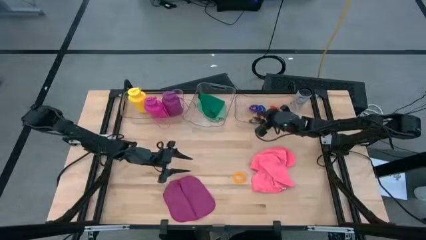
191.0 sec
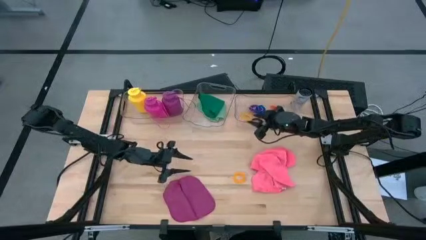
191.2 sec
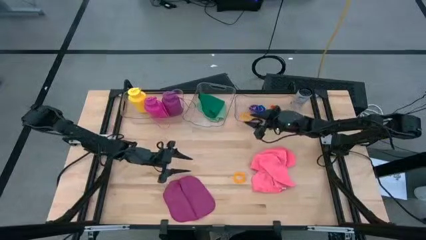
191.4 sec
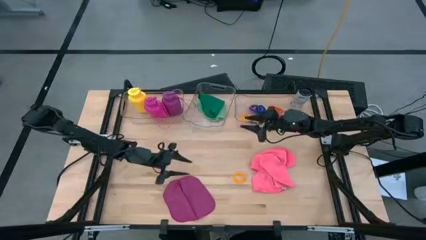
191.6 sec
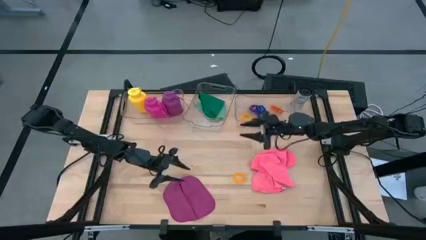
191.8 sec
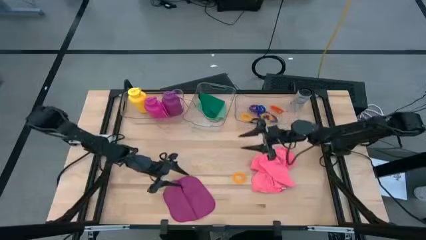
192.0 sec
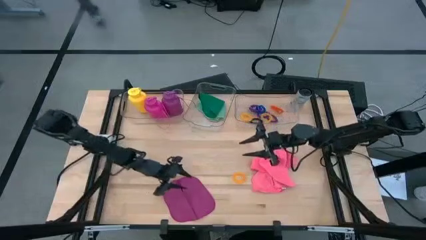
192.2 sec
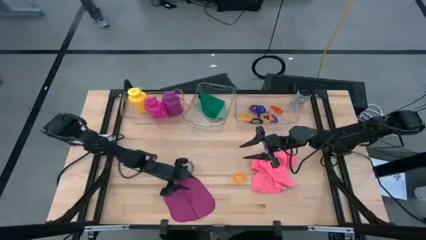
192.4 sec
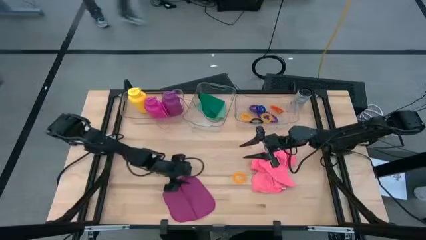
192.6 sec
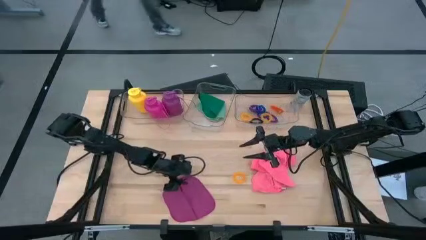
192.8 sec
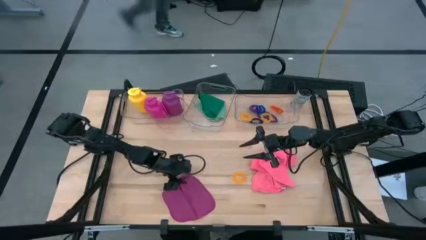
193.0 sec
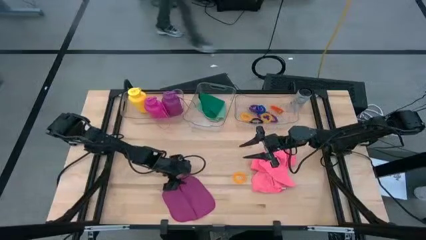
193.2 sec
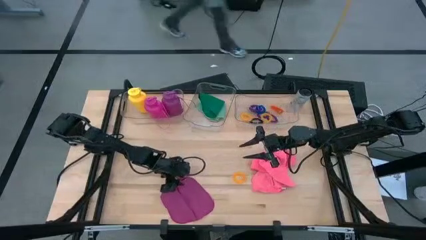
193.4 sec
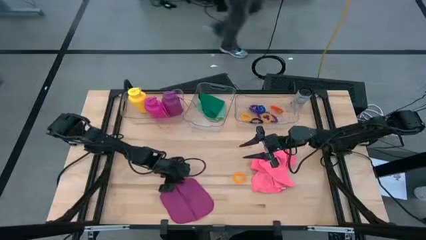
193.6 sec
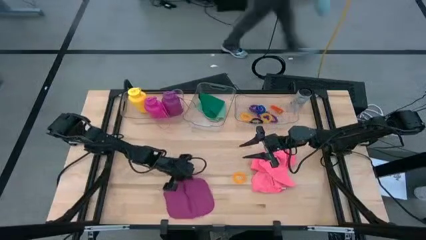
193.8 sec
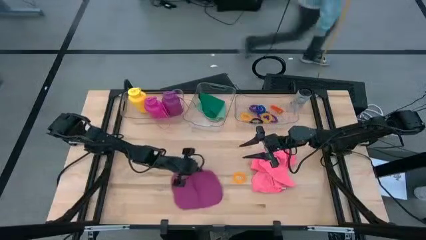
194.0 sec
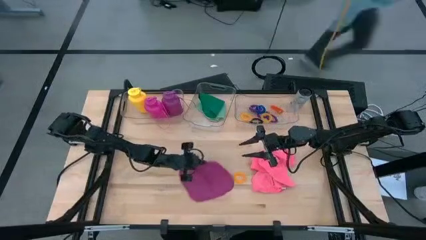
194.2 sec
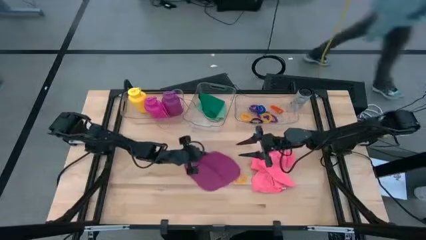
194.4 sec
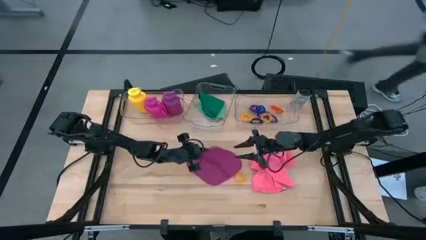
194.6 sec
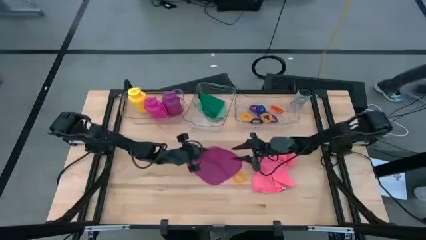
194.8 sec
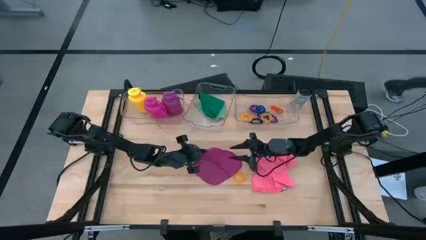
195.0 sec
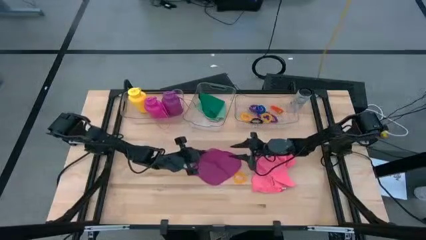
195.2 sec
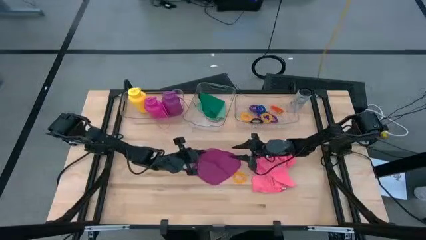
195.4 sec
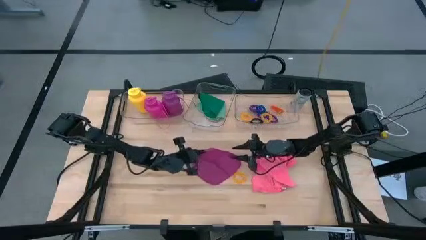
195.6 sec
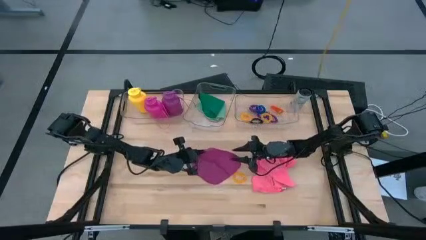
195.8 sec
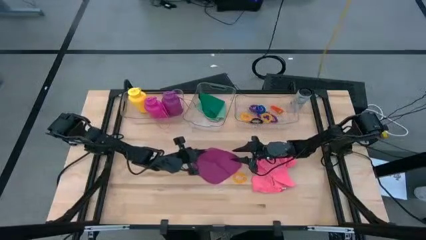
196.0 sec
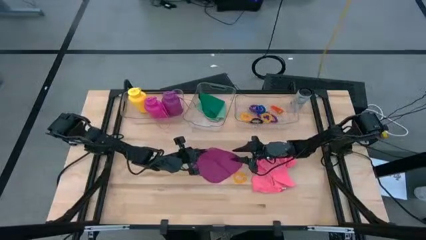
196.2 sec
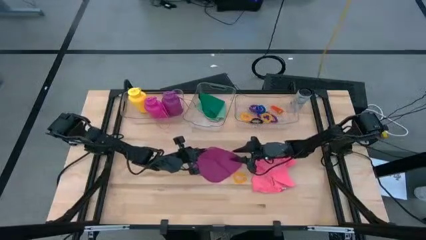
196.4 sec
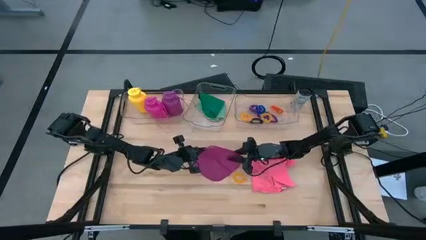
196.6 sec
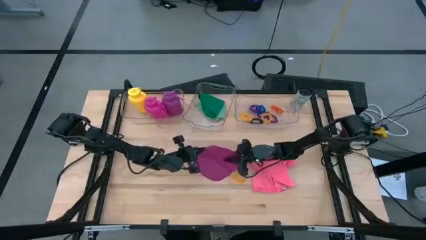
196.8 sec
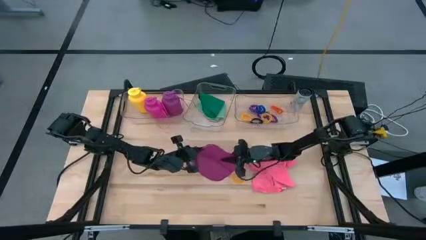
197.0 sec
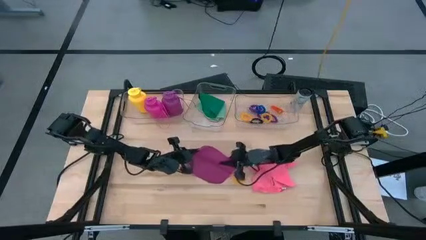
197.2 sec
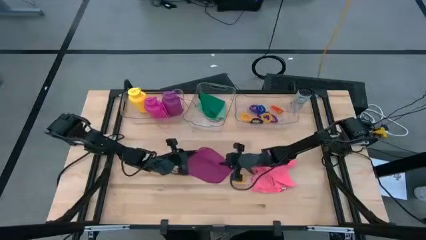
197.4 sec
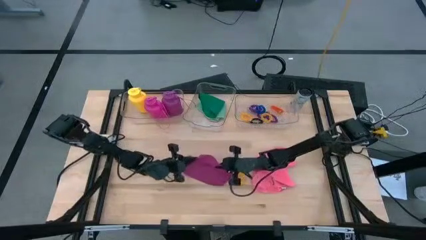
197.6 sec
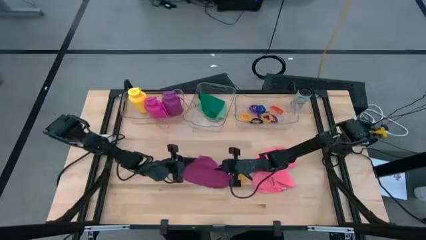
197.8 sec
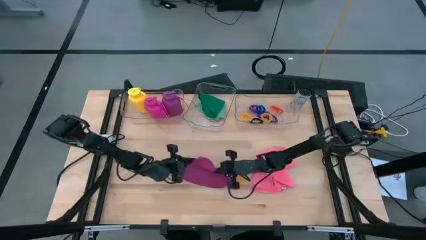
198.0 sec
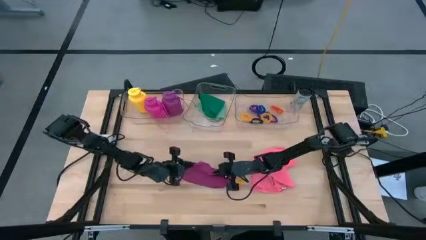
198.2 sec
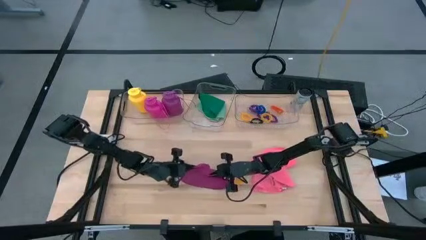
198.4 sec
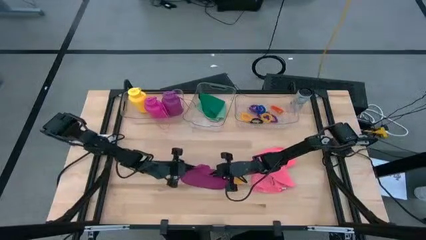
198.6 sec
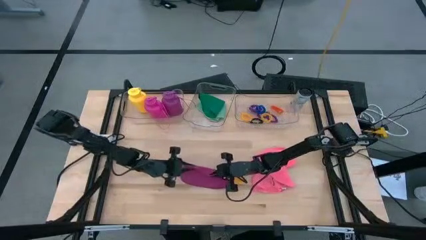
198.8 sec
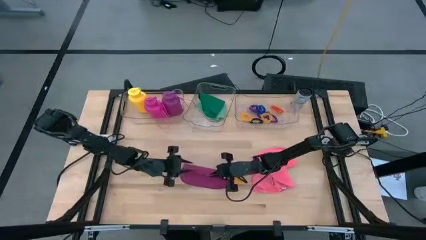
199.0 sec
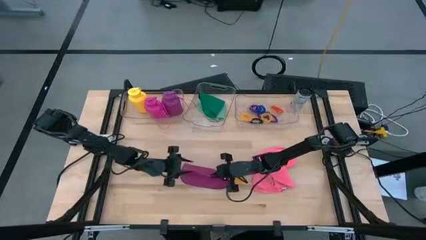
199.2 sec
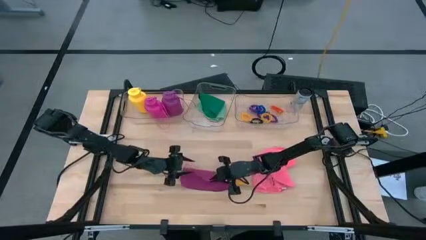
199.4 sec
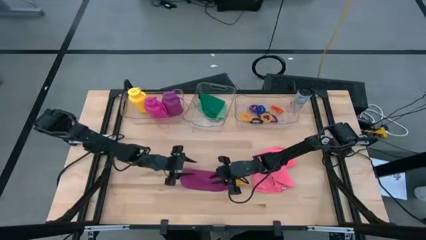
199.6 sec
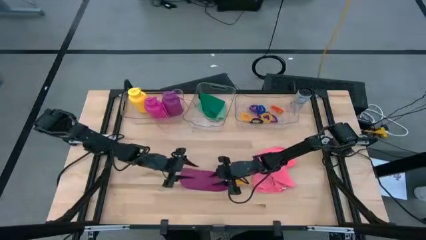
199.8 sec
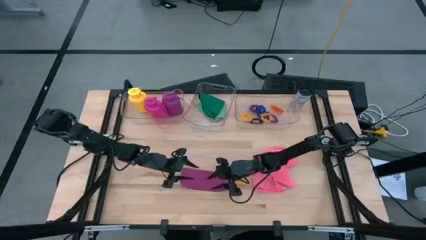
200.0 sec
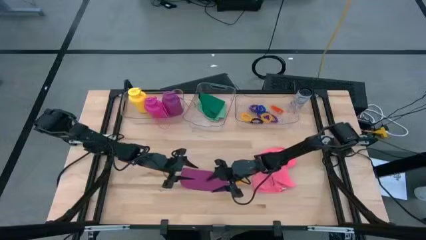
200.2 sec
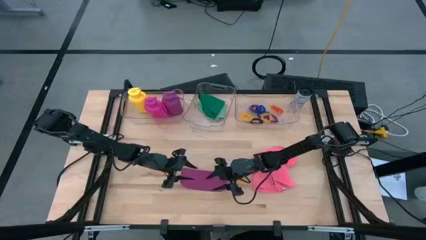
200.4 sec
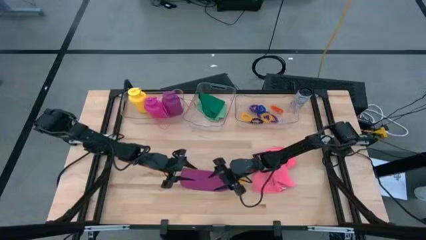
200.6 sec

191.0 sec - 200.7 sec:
Task: Pick & Place Sports Items
Fold the purple microfiber towel

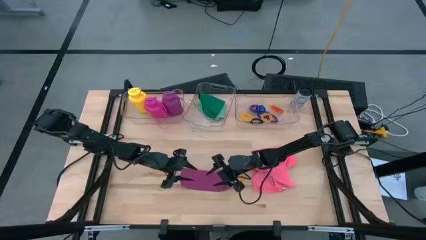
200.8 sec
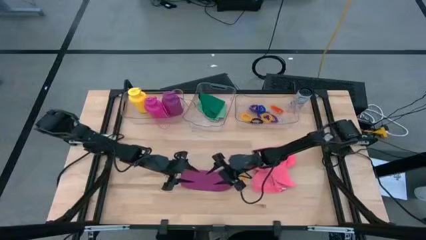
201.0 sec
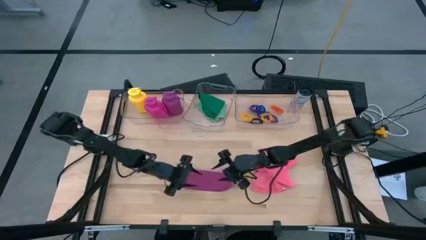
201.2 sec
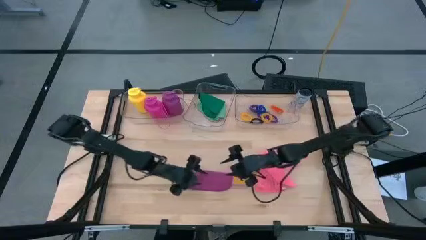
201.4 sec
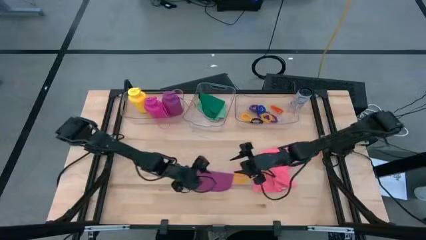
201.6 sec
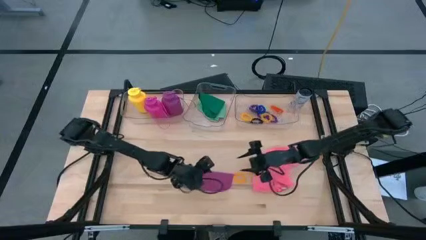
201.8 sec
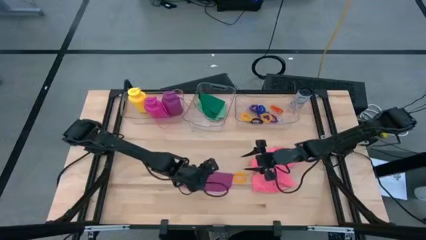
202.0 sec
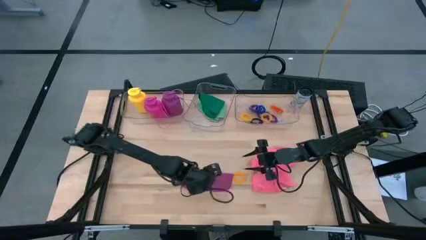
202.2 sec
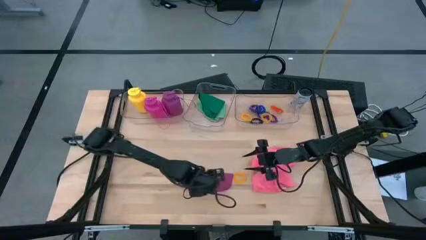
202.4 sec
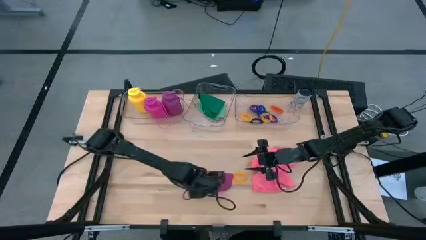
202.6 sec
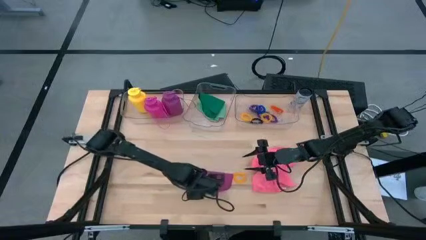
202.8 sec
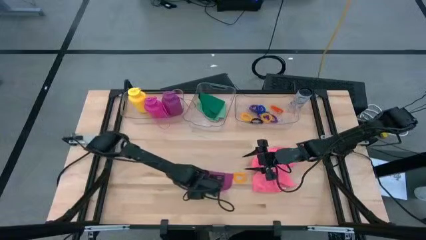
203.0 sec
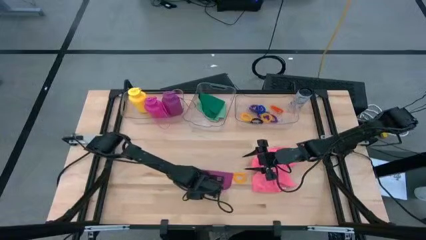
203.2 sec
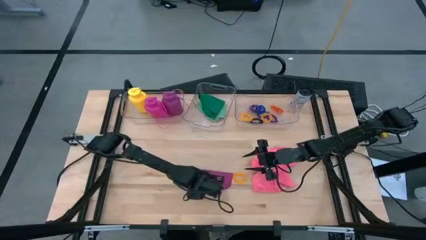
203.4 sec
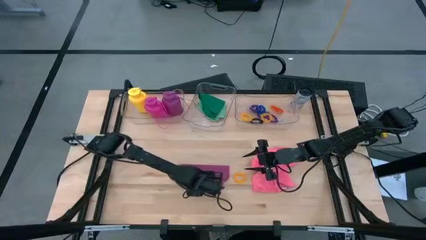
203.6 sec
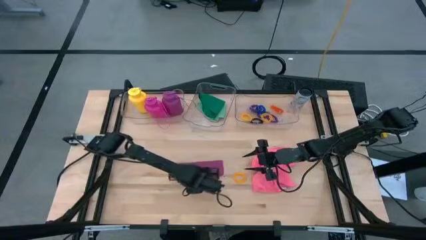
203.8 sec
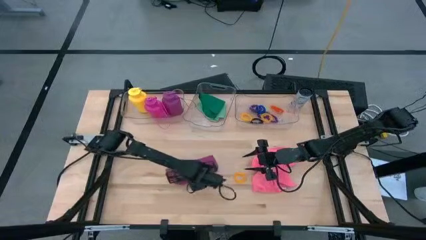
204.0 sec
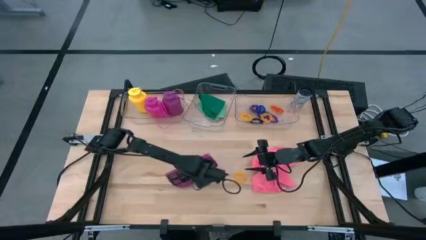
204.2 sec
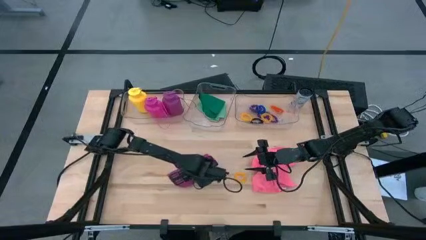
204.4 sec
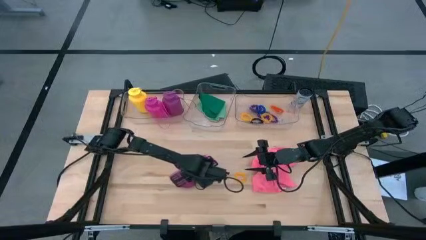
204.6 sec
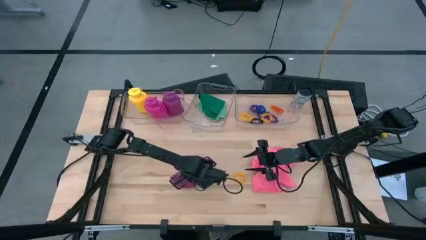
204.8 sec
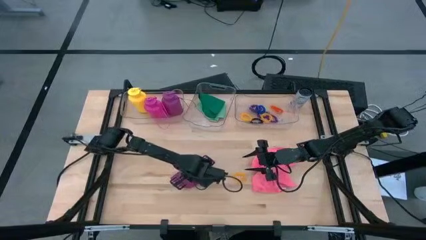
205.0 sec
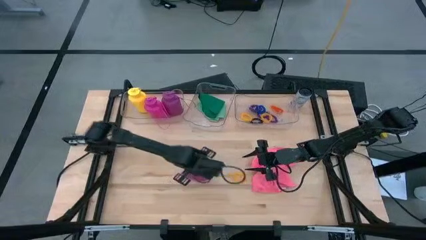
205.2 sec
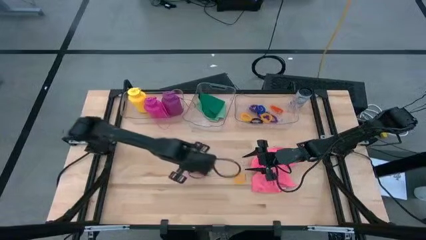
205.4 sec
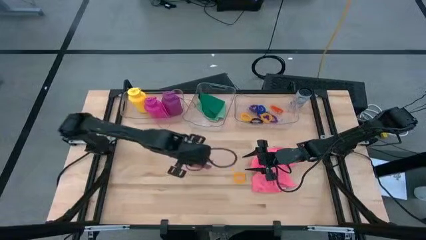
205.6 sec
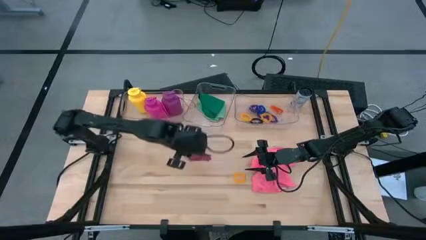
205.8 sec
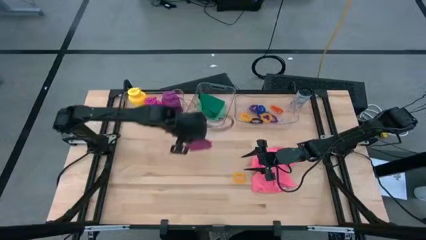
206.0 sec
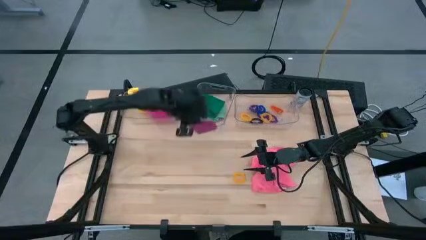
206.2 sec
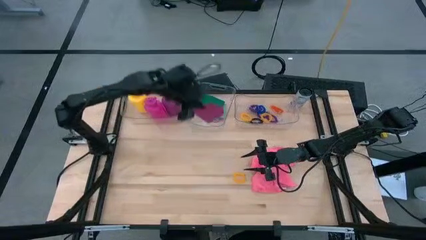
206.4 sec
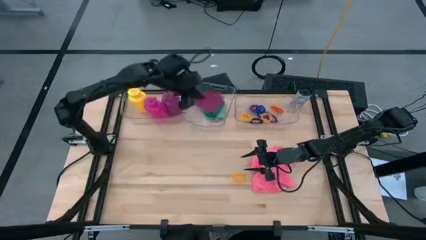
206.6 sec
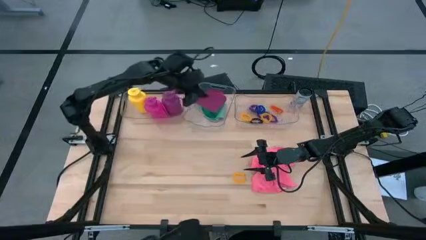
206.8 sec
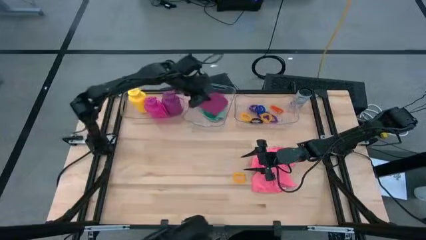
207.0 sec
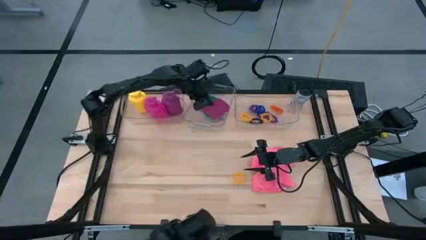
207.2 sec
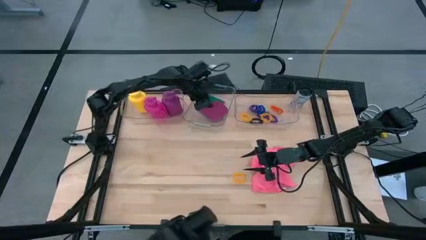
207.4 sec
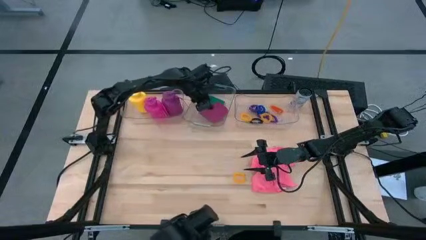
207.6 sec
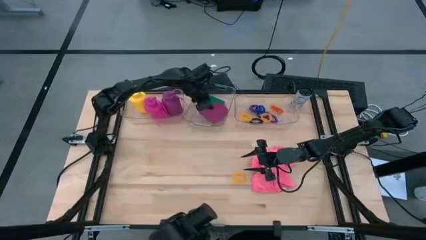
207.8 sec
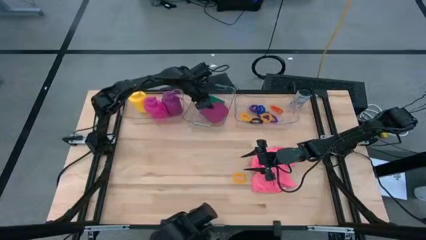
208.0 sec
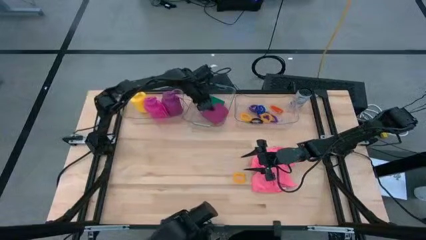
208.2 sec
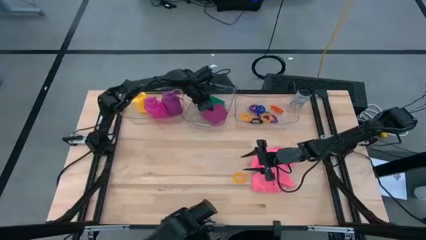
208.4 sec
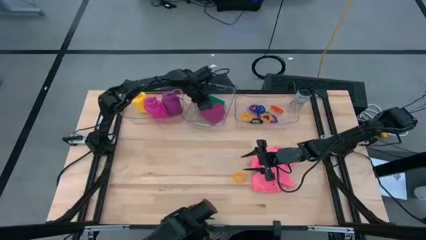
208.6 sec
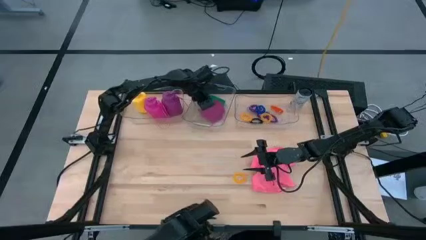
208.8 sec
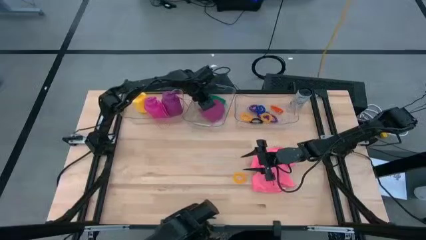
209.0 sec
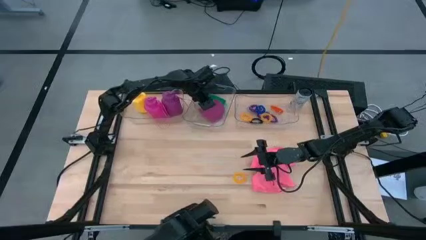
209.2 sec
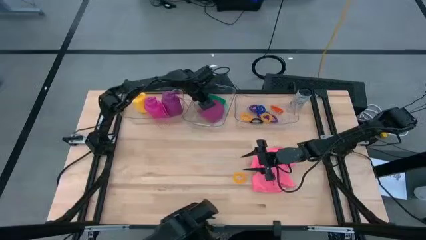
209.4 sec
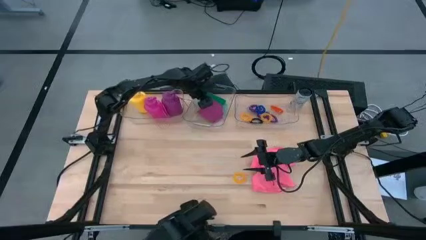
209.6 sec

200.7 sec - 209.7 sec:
Put the purple microfiber towel into the middle transparent bin
